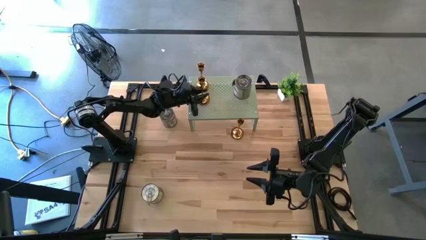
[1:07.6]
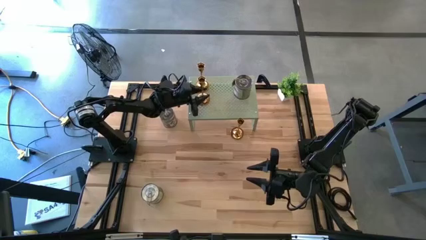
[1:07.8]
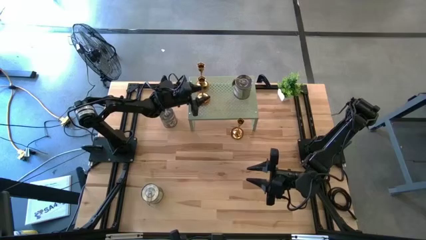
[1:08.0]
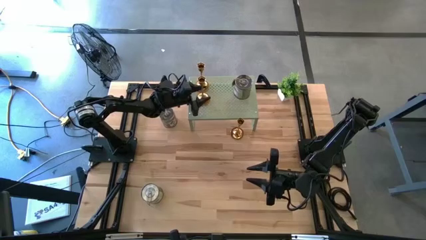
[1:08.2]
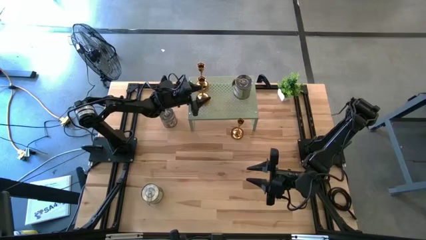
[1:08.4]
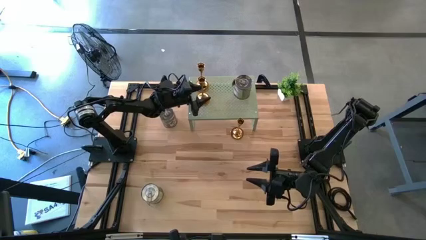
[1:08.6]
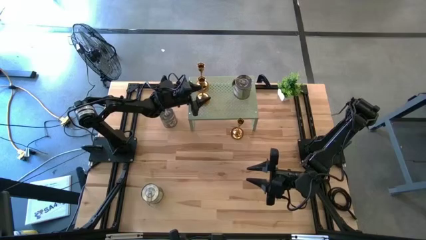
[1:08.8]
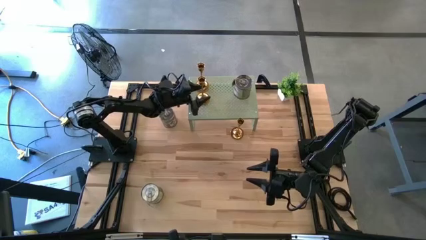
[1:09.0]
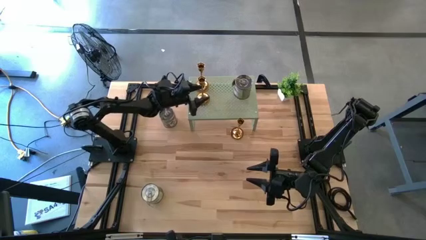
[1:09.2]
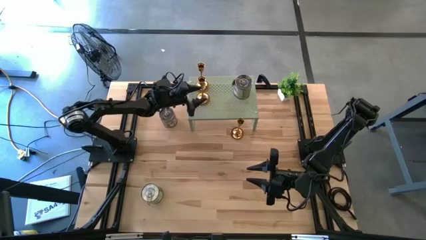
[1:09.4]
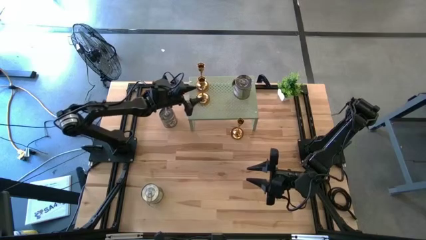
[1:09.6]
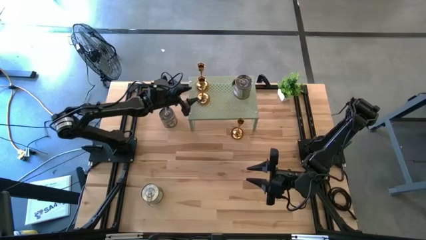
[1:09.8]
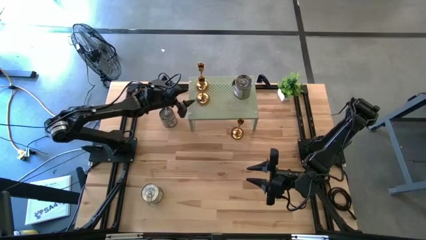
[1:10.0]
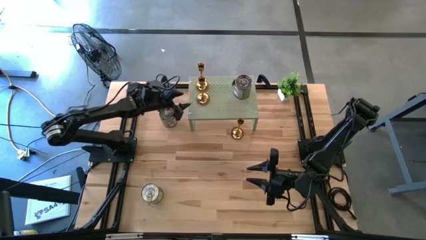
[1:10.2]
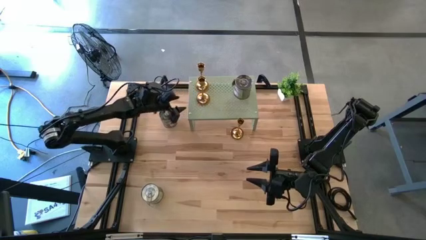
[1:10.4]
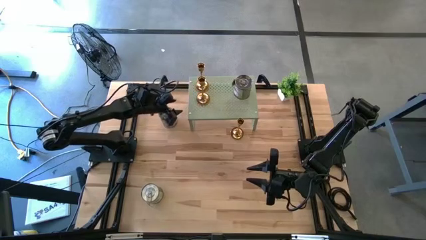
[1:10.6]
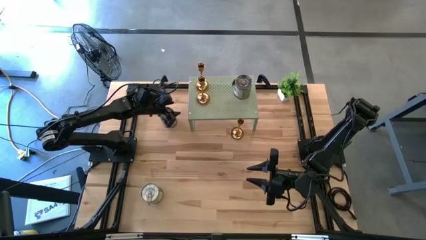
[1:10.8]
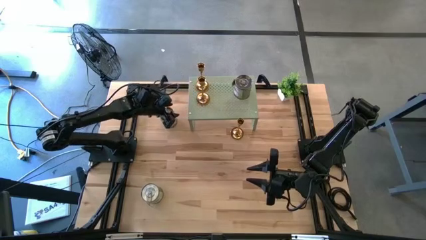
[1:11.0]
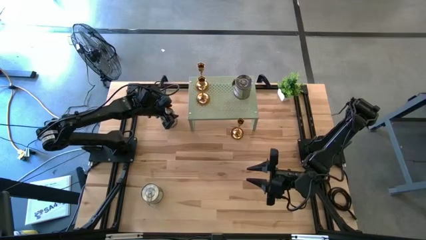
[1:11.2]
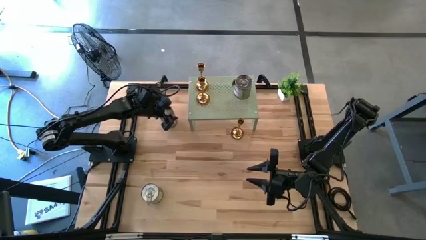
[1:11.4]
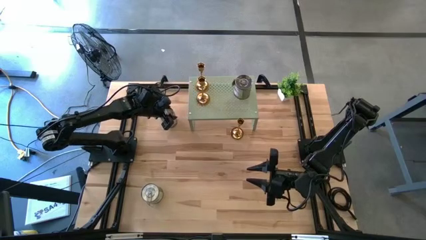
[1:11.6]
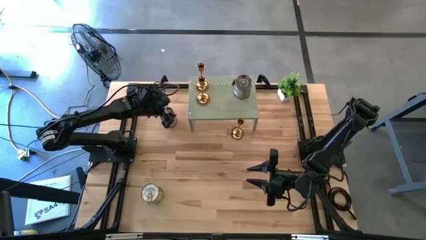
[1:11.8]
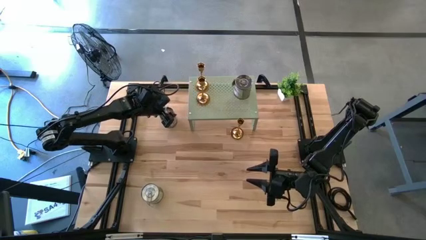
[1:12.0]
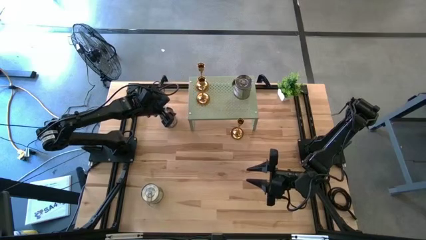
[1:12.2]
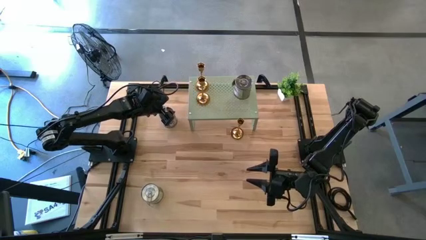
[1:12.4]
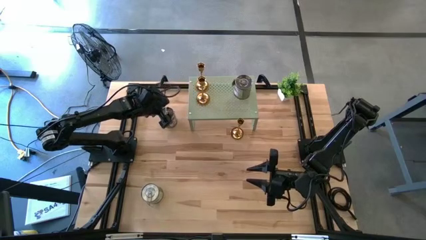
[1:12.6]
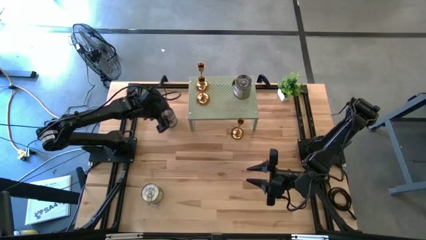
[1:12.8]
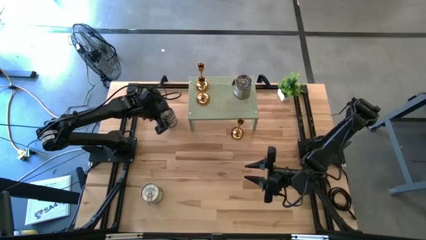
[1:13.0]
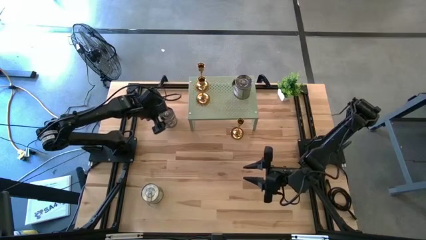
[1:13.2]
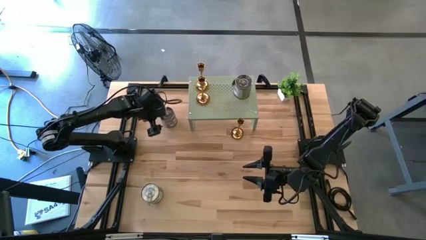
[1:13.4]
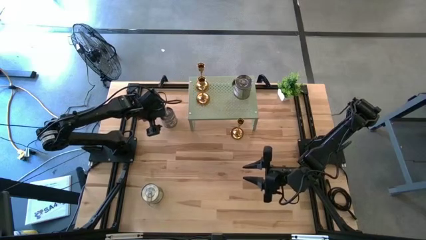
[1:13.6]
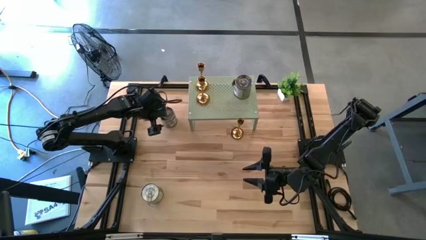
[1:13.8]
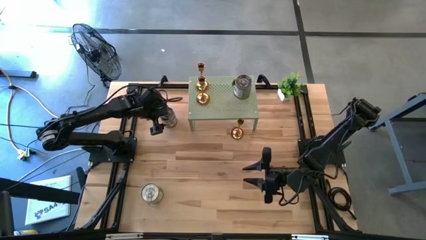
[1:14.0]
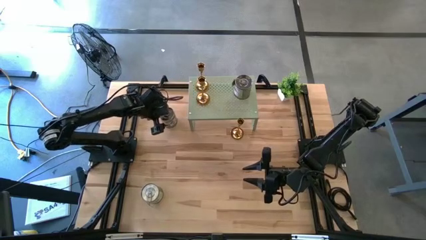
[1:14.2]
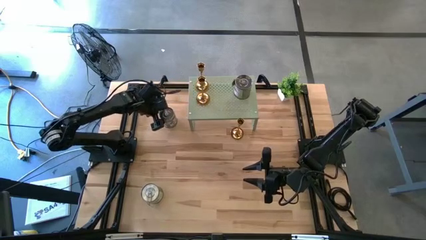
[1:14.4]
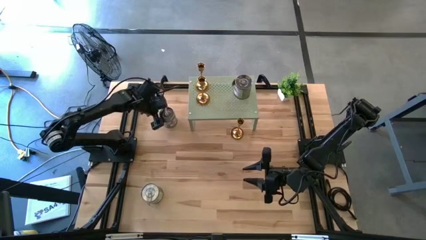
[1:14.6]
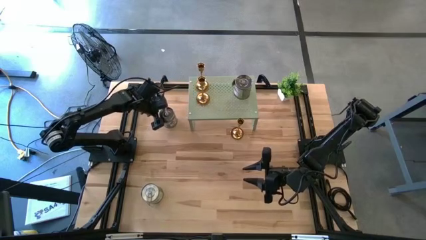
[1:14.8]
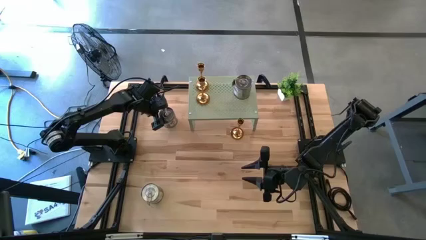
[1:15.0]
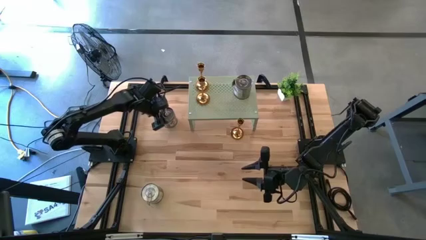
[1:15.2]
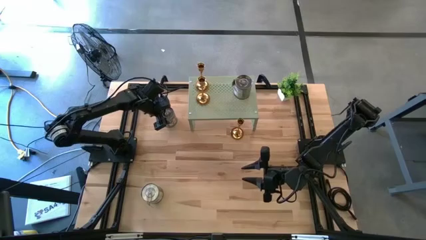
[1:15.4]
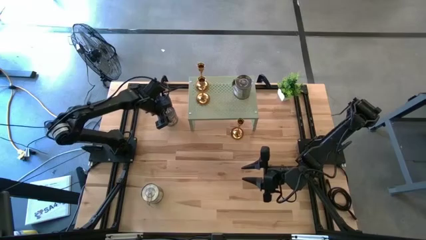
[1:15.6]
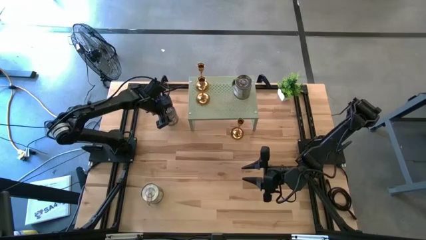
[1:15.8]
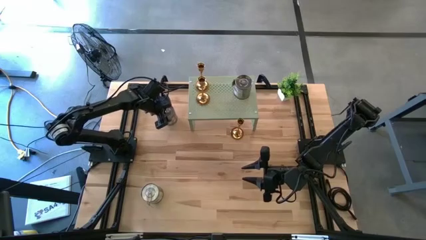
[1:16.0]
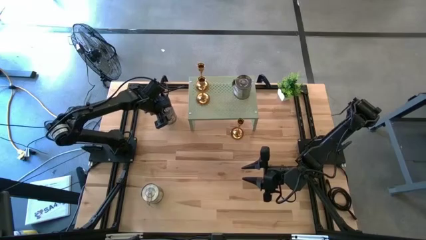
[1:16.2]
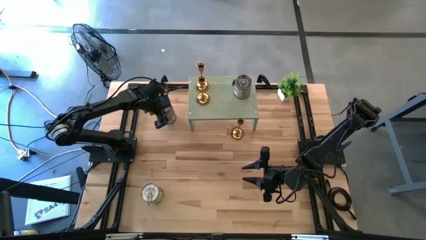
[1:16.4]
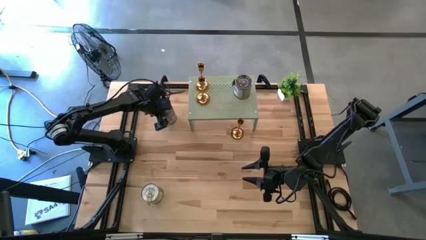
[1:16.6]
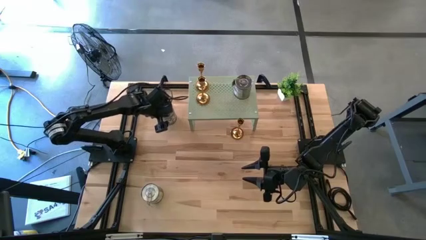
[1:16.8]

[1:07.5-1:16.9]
Task: Pick & Place candle stick holders
Put the top silver scented candle on the shelf aligned with the other silver scented candle

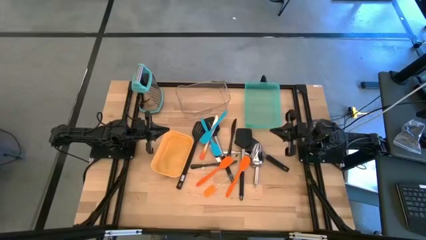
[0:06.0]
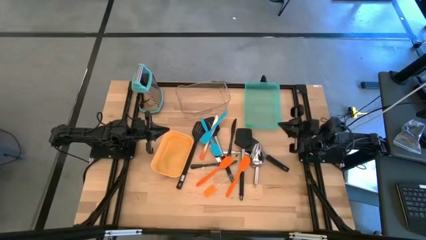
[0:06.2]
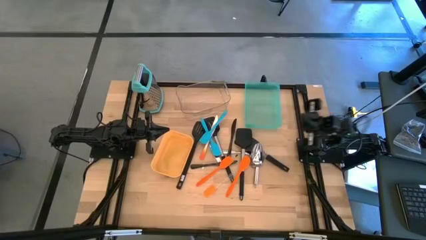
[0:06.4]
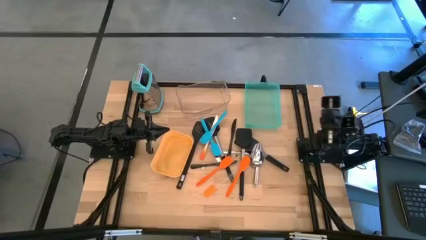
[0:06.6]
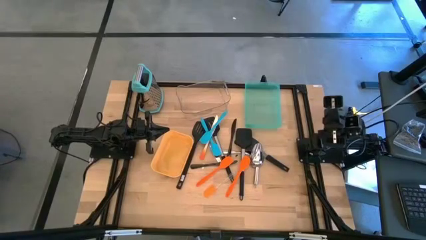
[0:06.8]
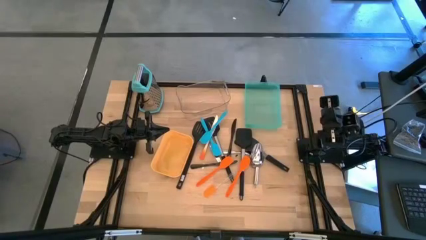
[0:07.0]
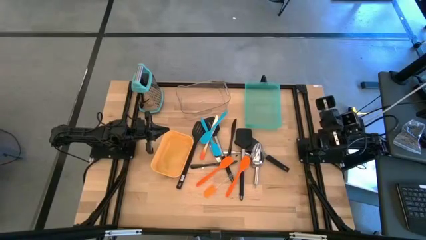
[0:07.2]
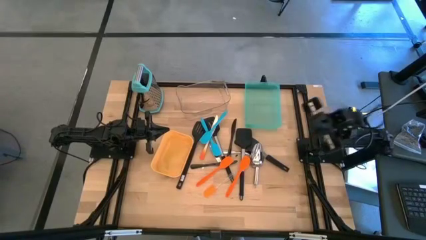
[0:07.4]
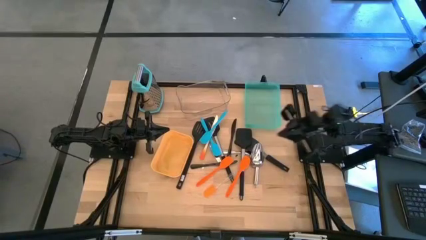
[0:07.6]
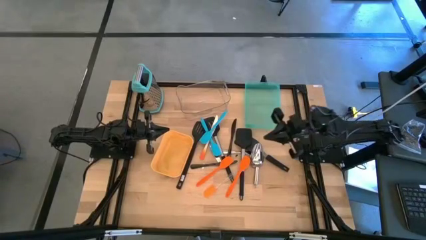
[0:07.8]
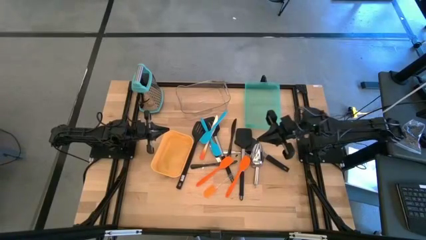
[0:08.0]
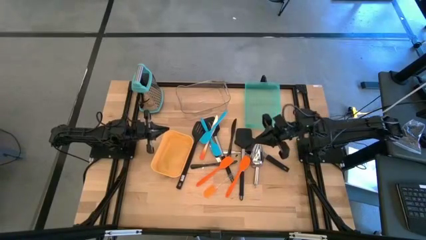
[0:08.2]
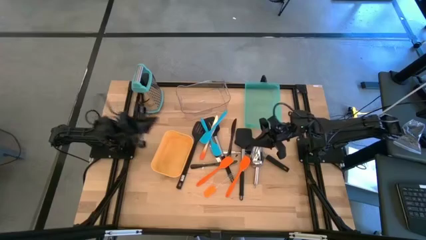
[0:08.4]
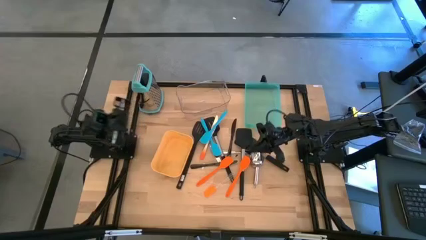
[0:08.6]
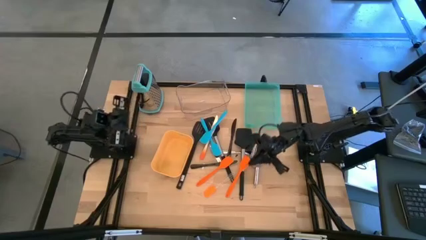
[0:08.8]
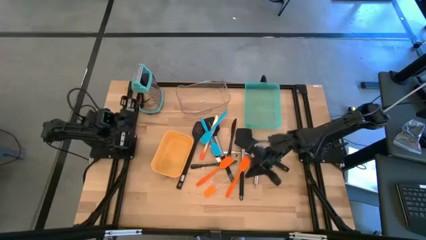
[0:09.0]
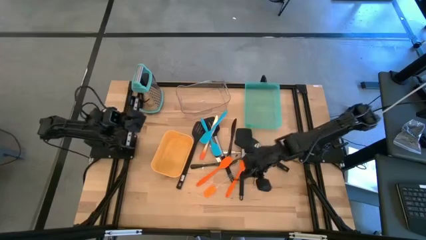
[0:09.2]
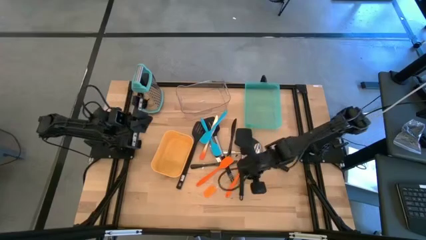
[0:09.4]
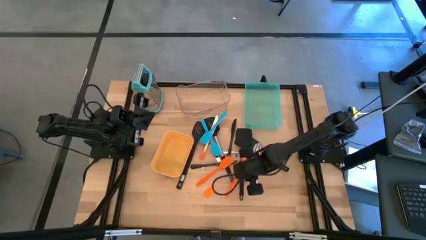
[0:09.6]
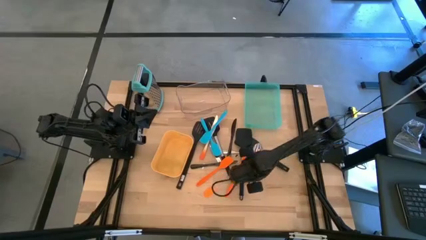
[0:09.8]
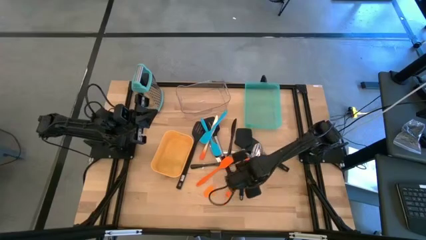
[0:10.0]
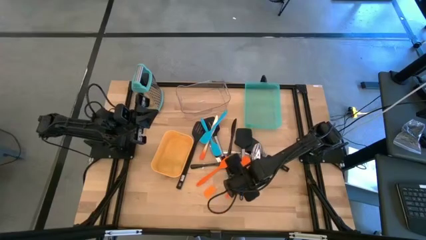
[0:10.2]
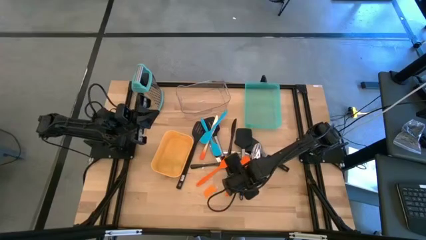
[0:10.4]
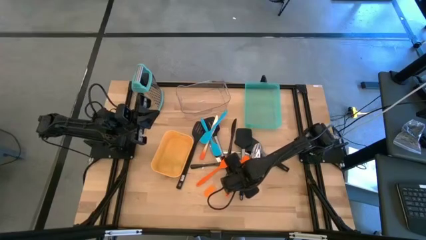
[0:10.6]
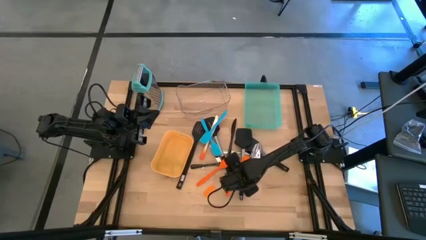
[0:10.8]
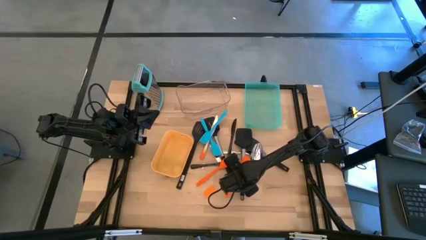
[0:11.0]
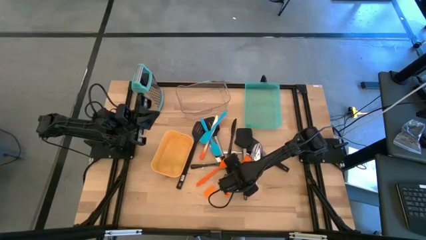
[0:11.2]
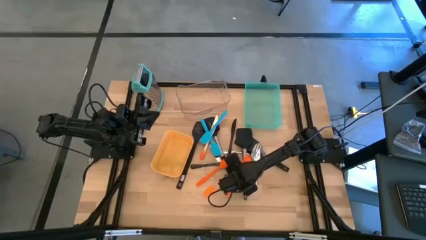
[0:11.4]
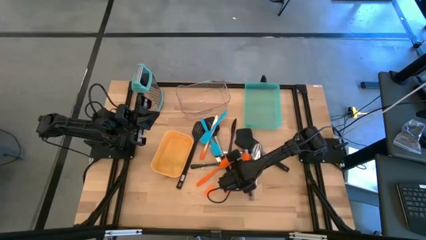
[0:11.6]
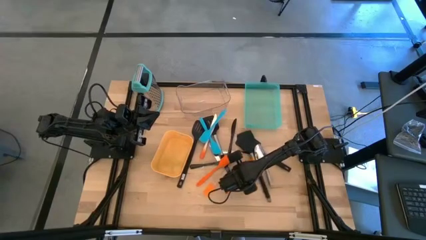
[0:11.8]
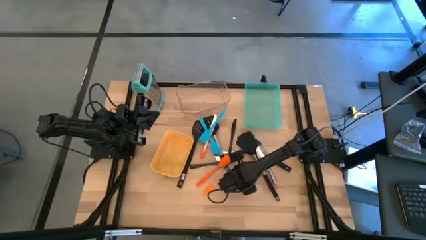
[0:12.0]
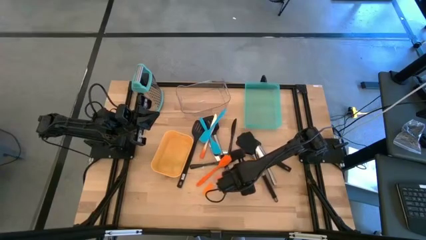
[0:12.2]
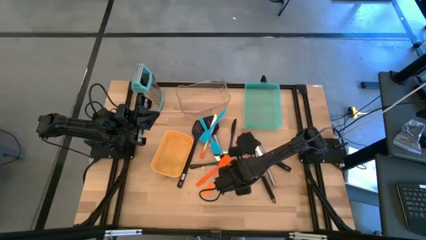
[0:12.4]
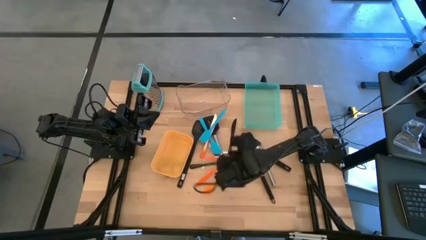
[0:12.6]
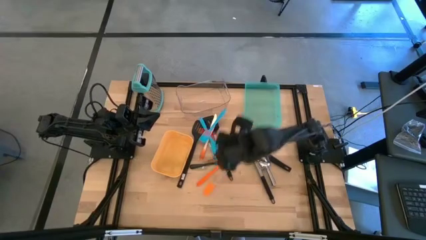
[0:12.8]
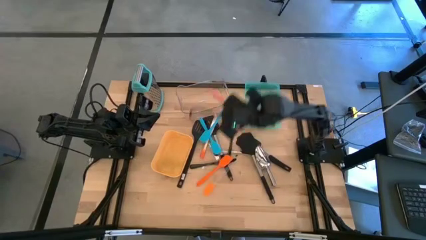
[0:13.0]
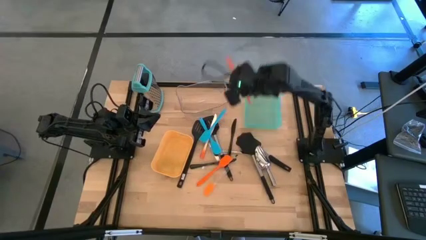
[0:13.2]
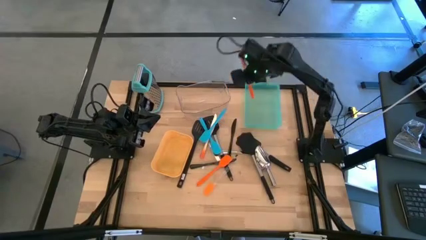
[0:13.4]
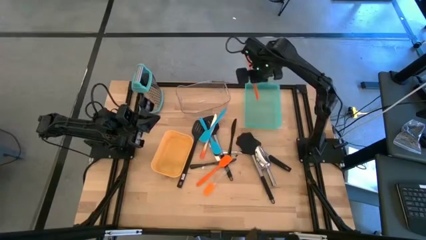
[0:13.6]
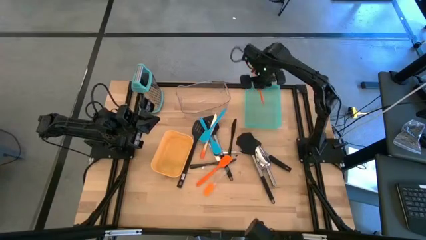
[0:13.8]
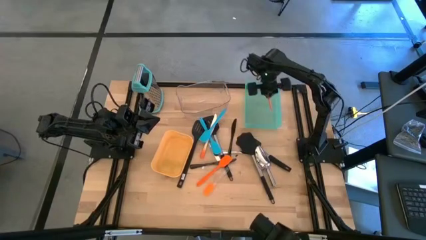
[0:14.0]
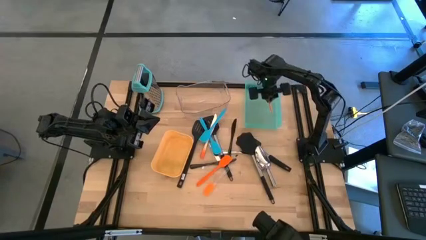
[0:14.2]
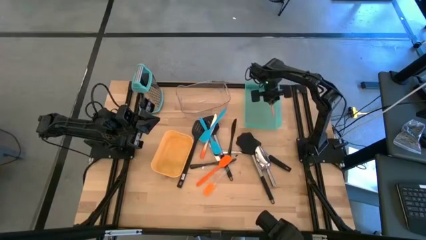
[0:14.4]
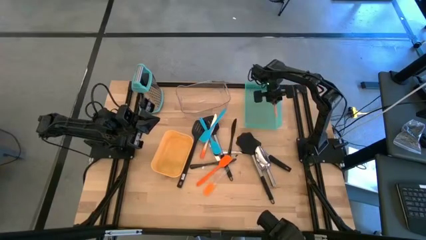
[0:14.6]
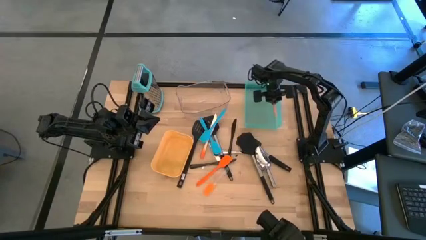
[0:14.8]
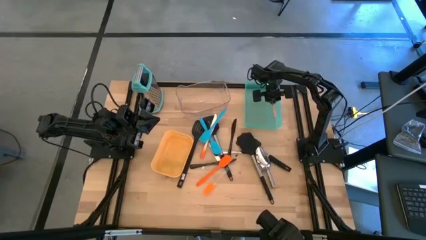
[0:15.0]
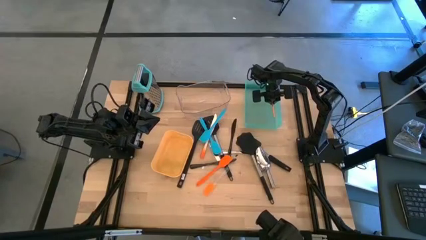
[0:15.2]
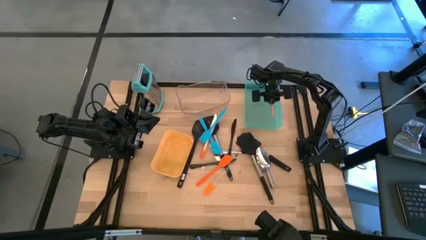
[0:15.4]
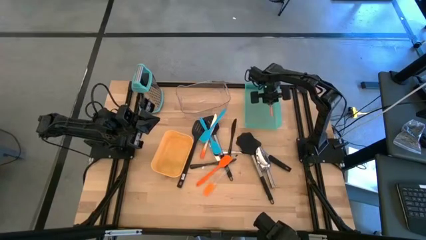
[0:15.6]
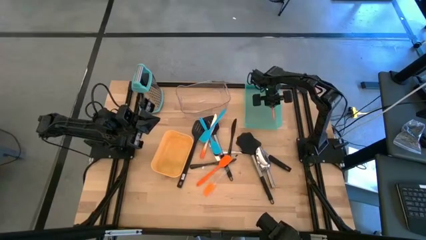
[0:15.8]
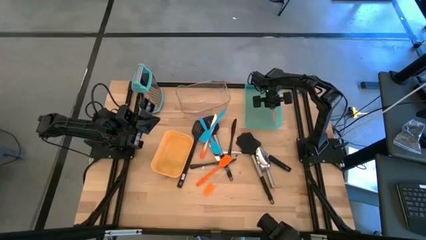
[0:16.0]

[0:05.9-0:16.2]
Task: Pick & Place Kitchen Items
Put the orange spatula into the green bin
